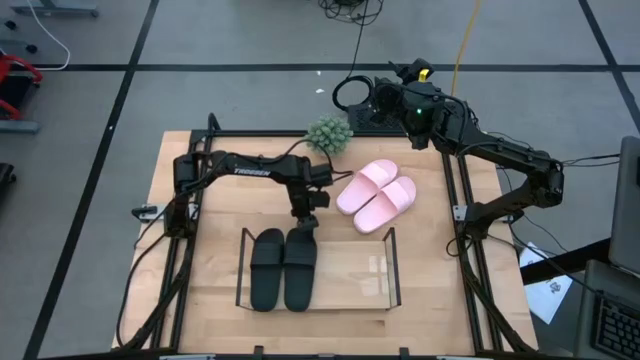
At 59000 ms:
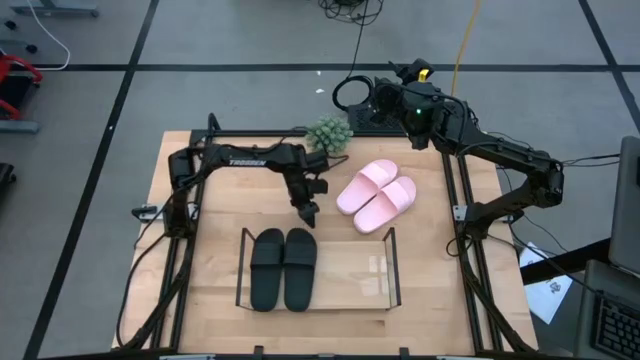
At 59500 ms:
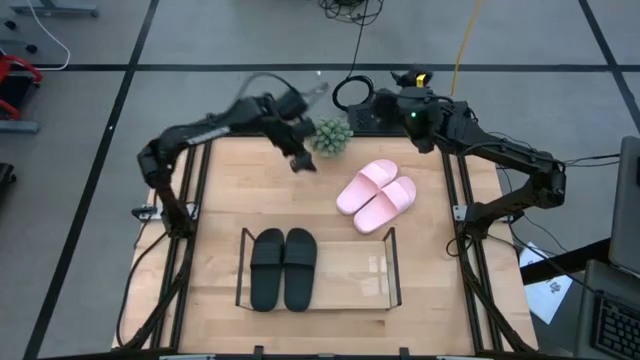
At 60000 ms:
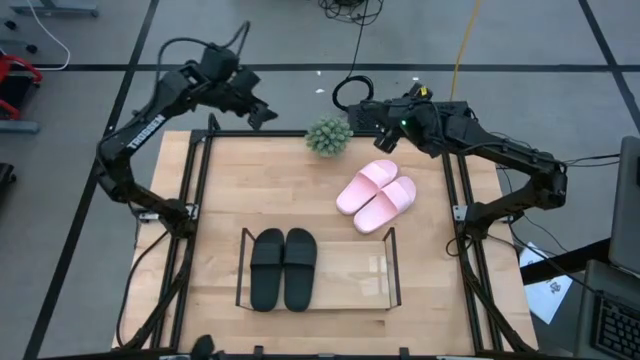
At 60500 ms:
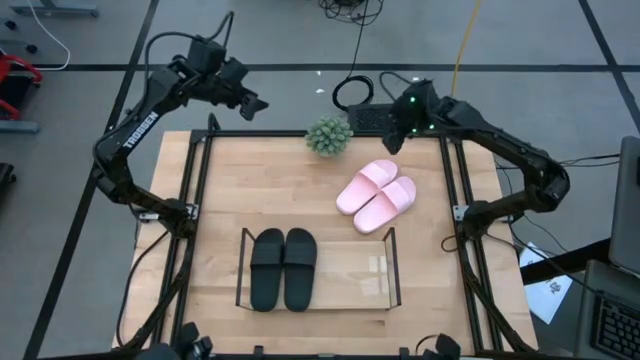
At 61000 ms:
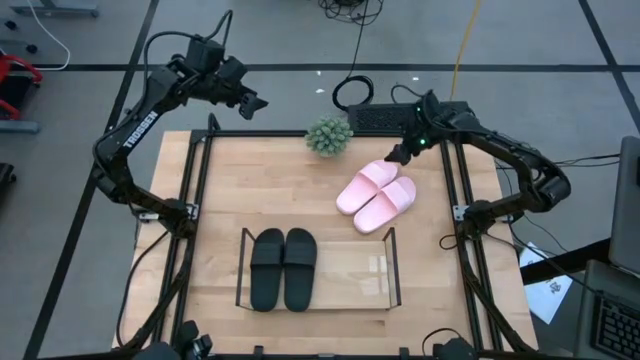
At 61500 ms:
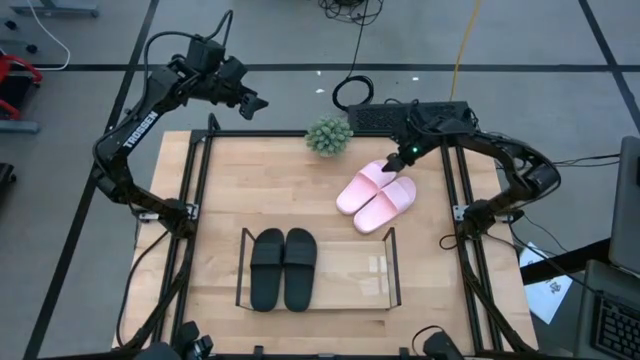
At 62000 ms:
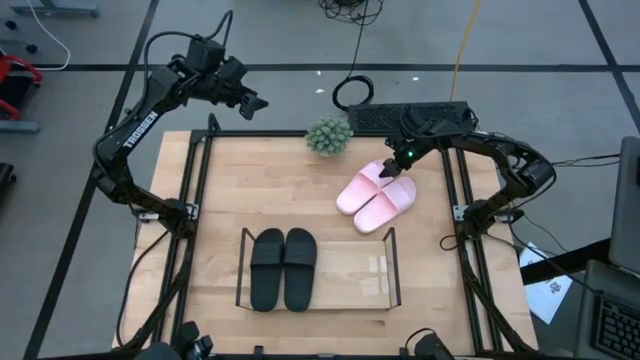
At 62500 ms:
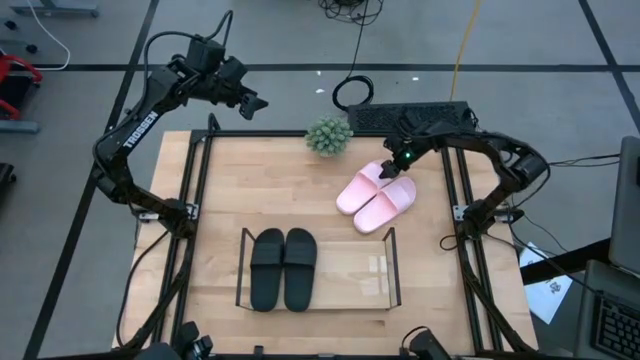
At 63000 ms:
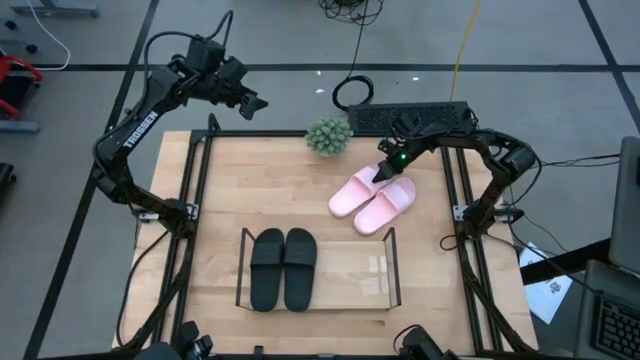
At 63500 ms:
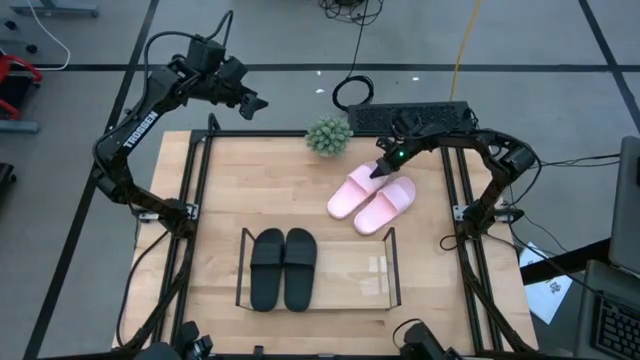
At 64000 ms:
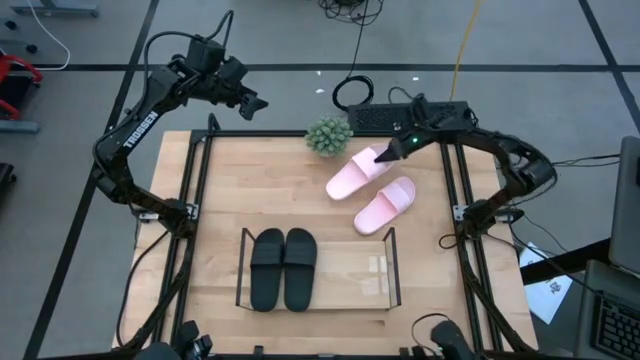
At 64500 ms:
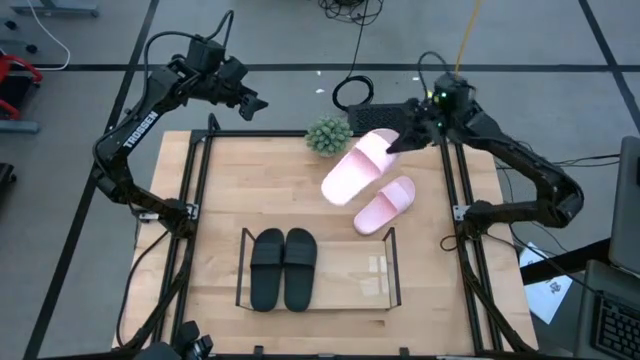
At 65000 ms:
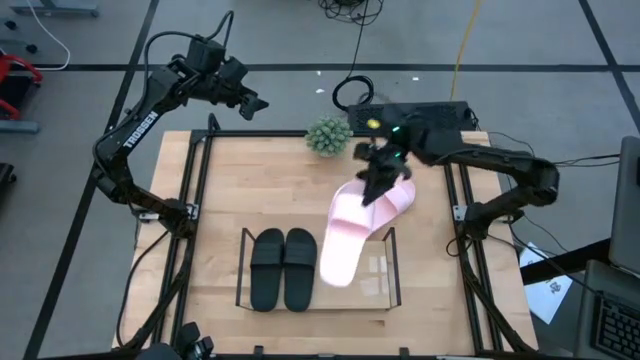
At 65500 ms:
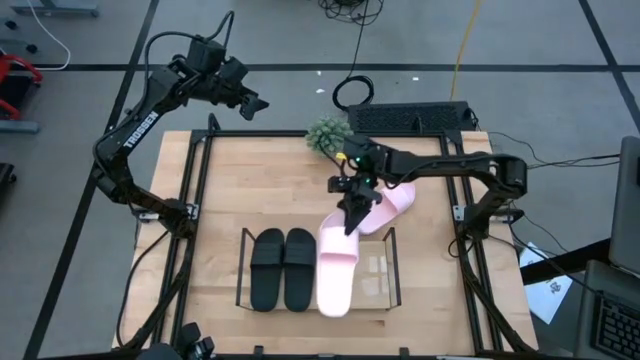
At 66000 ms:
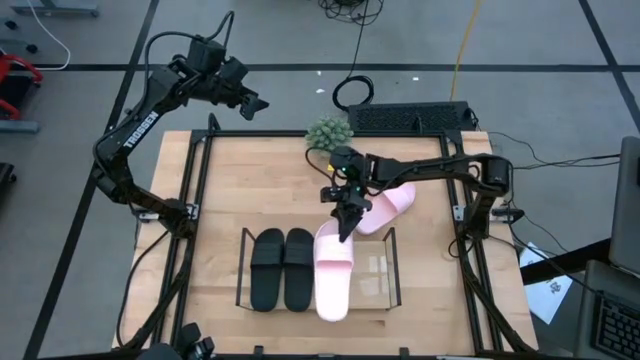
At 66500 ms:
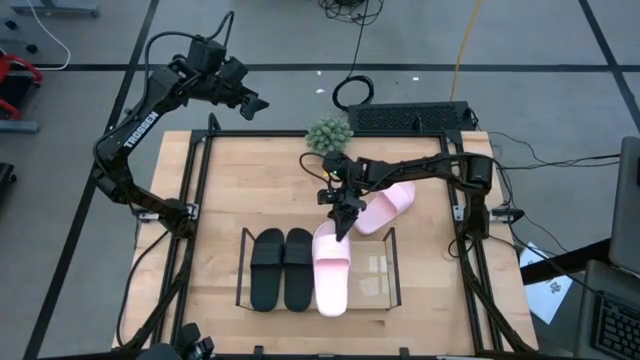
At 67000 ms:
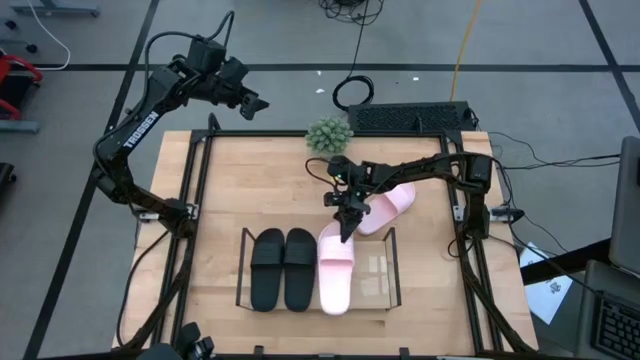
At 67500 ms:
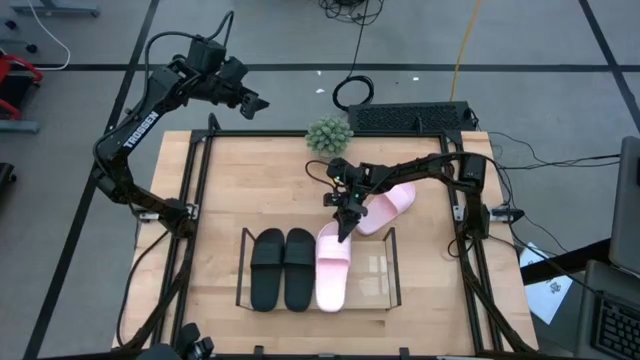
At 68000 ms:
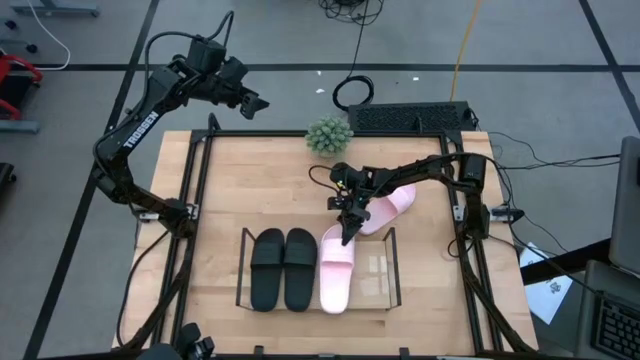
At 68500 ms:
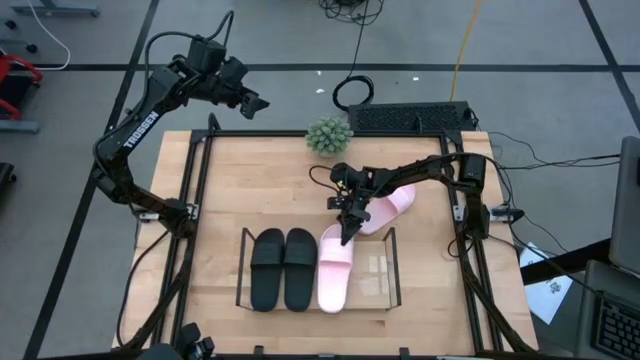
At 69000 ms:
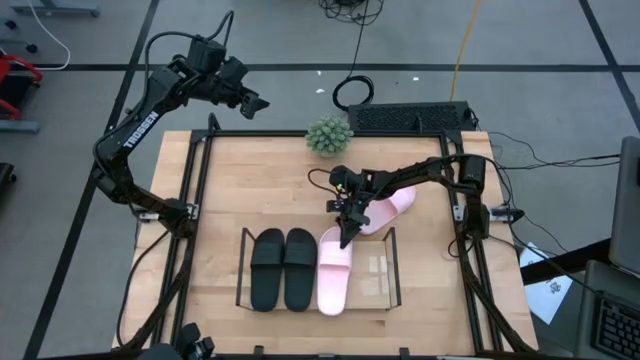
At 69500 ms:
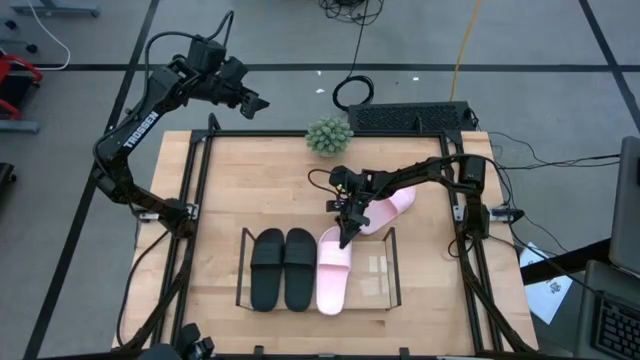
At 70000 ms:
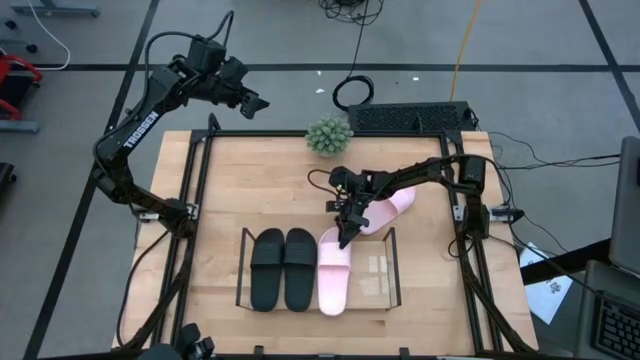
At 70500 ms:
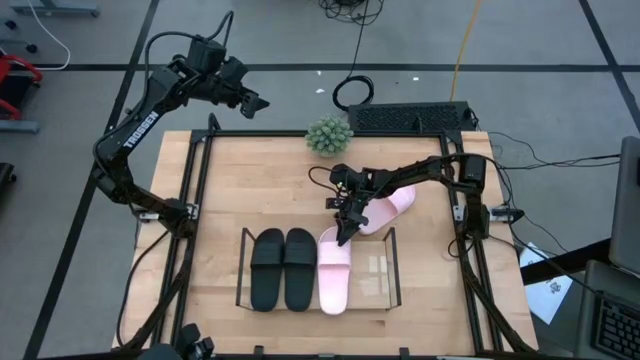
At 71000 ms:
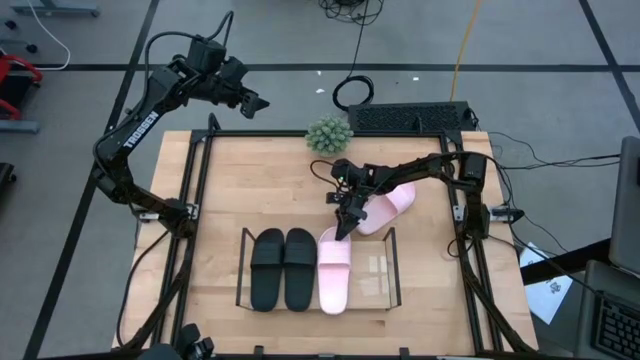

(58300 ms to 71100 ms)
Task: Pick and place slides into the shelf
Put the left pink slipper on the shelf

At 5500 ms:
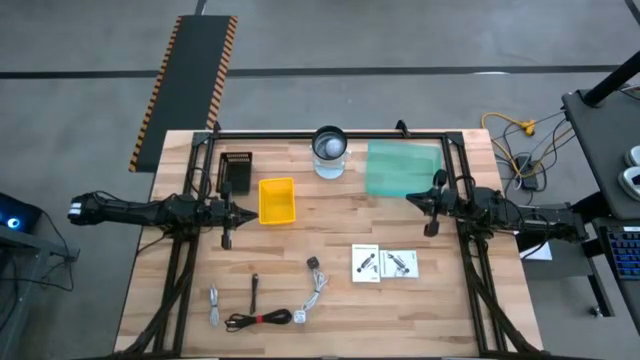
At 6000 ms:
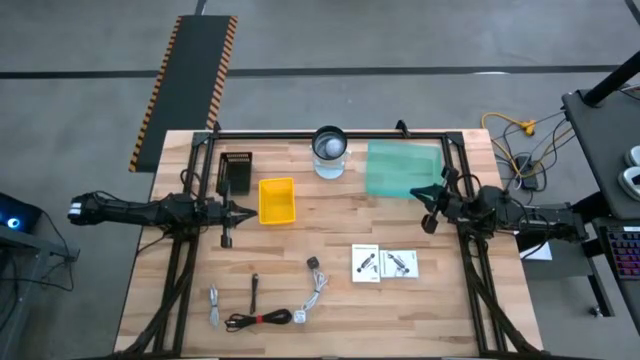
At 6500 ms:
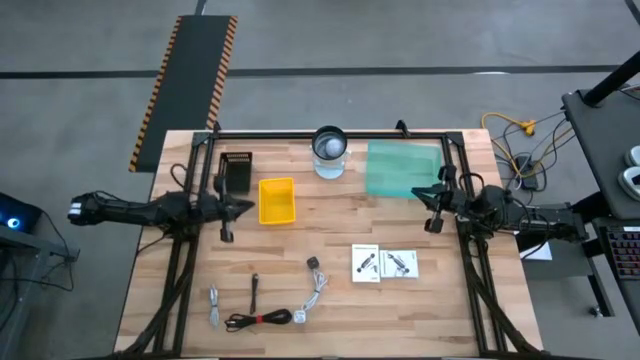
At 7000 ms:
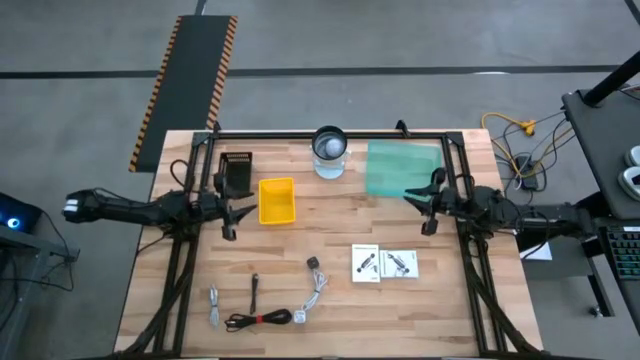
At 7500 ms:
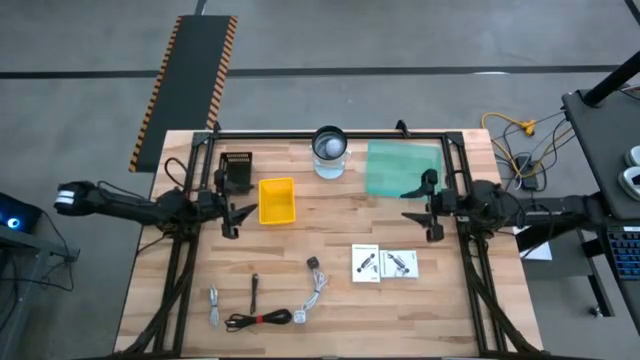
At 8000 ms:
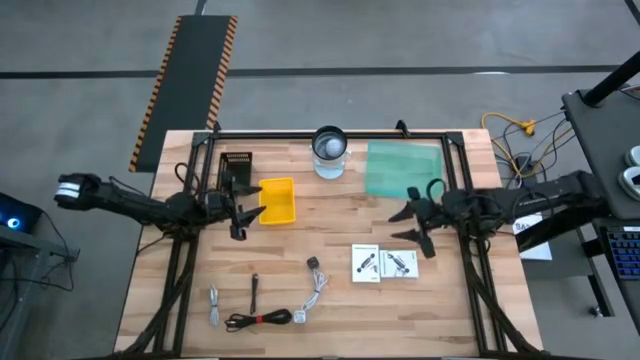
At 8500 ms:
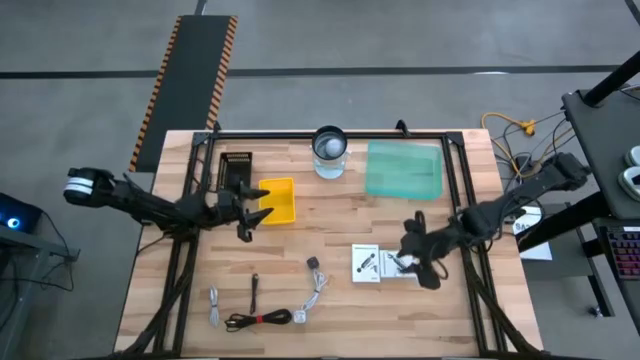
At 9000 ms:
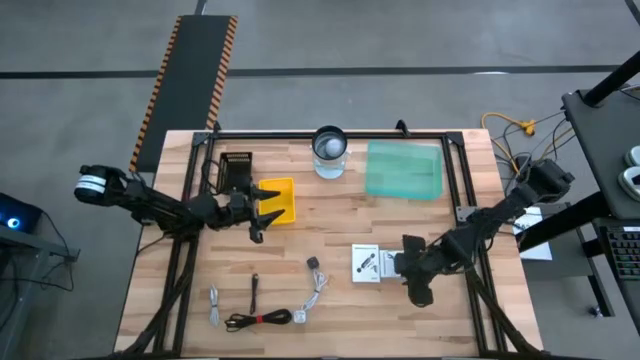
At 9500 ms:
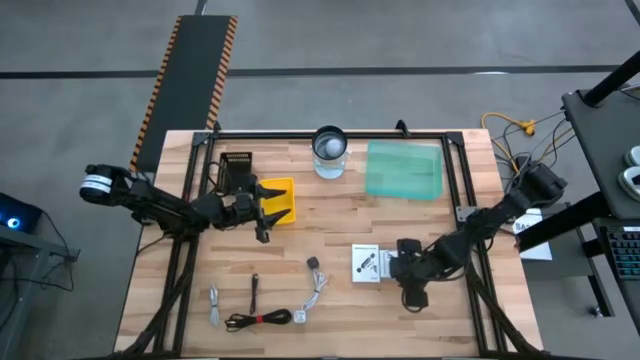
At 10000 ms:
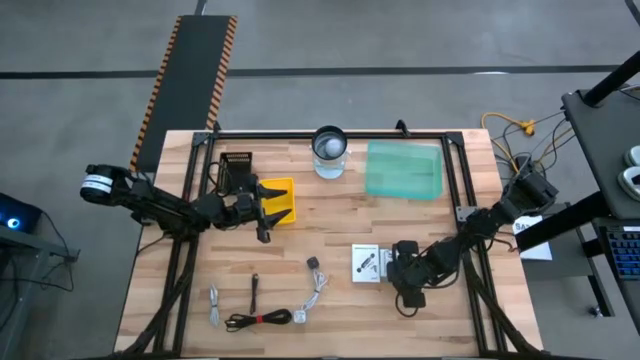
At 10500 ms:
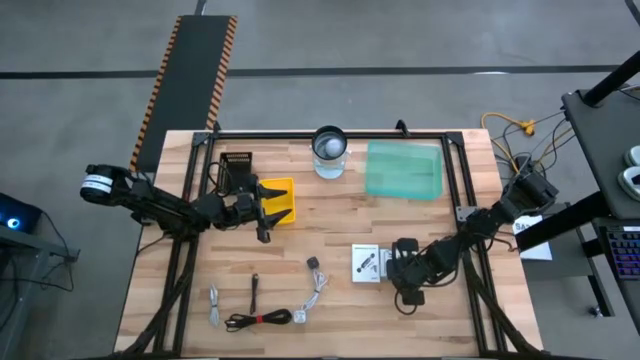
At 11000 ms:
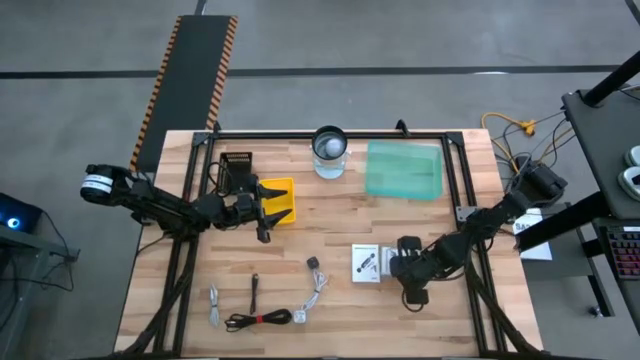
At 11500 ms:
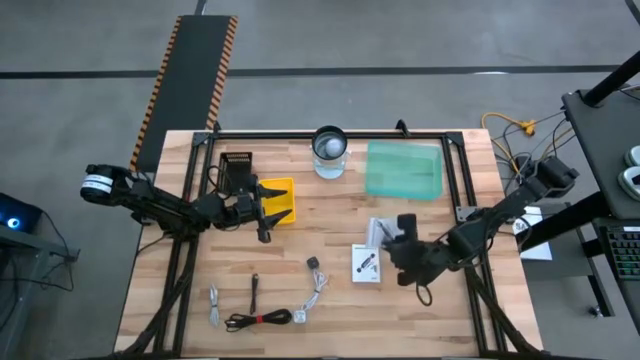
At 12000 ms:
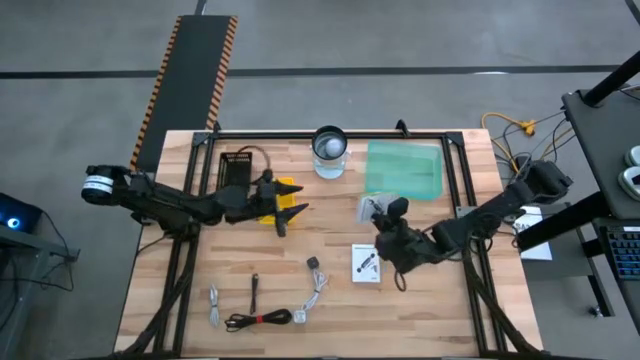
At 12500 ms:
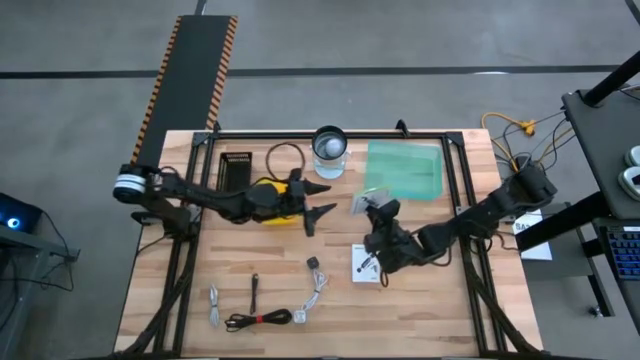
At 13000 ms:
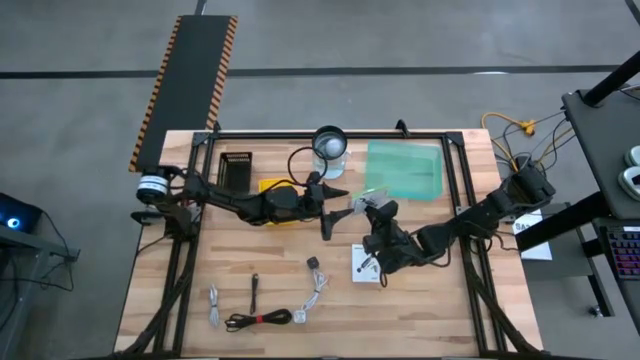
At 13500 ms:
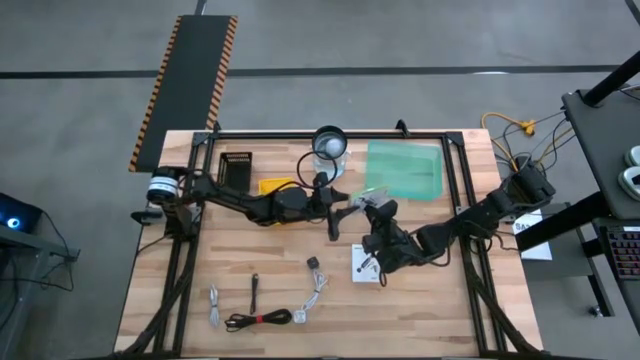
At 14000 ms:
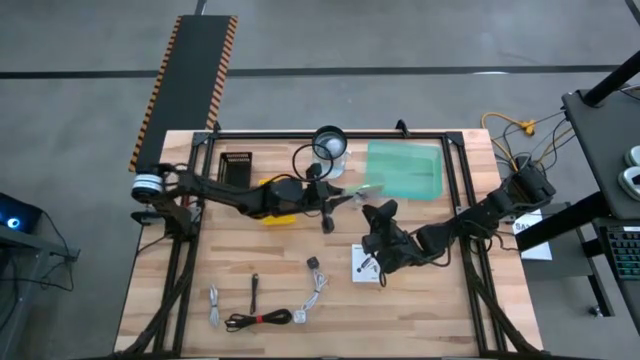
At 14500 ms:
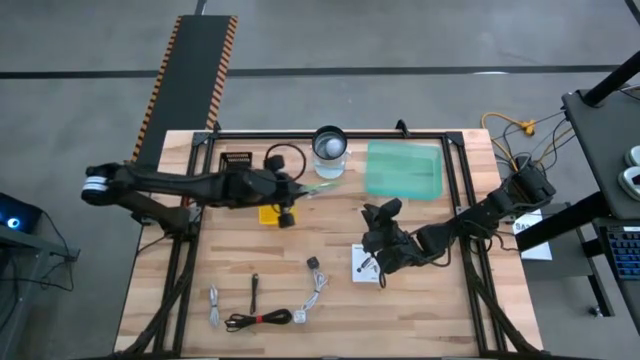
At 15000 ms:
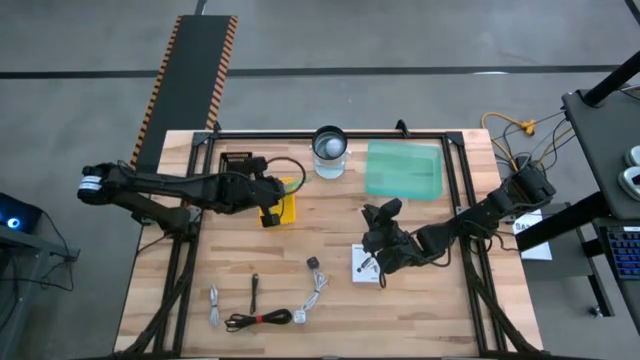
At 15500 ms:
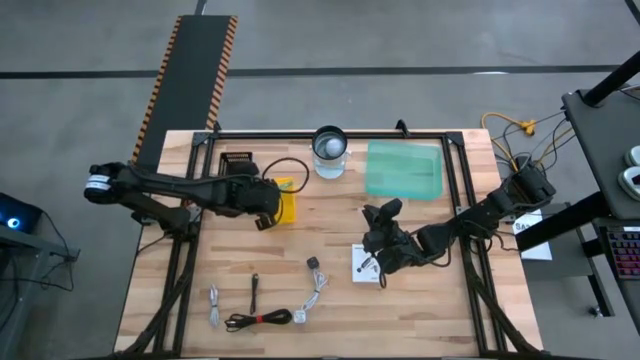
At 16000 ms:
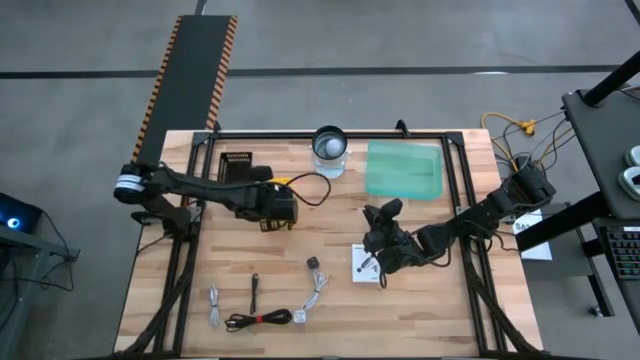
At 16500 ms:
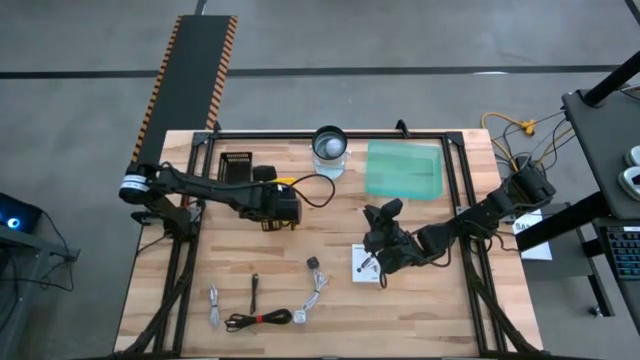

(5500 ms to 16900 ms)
Task: Pick and place items into bin
Put the right white card reader box into the yellow bin
